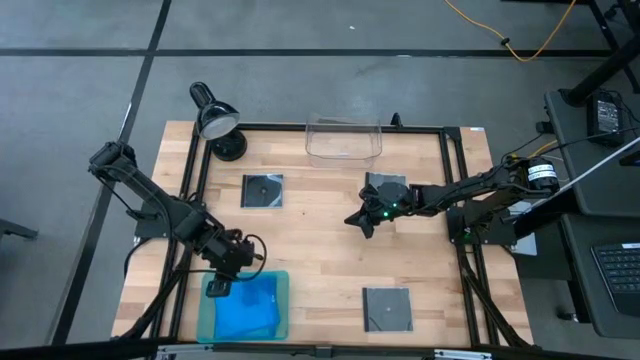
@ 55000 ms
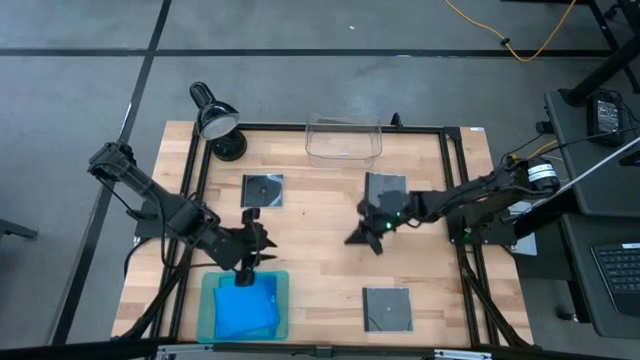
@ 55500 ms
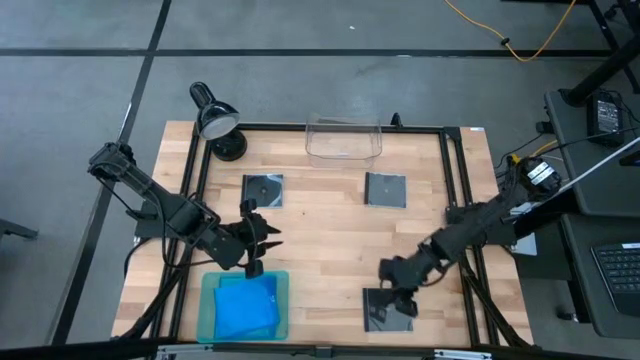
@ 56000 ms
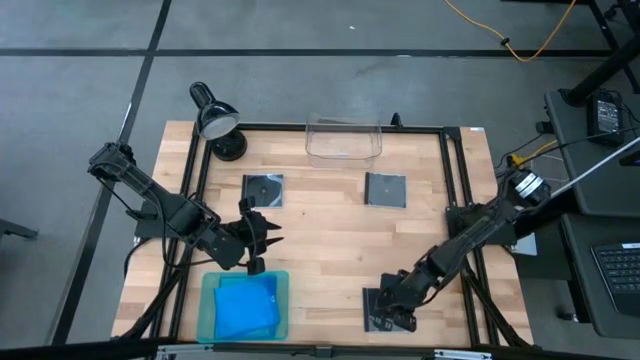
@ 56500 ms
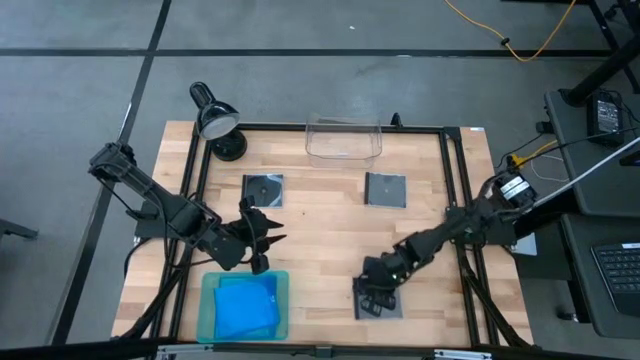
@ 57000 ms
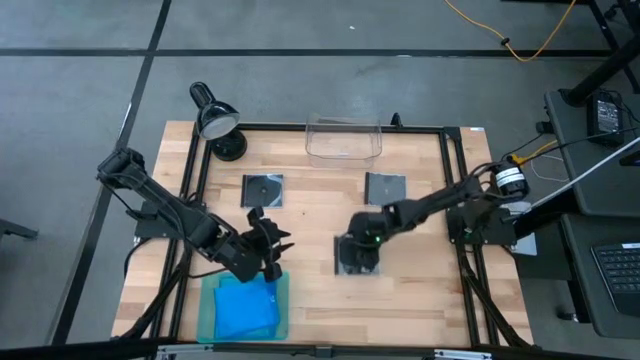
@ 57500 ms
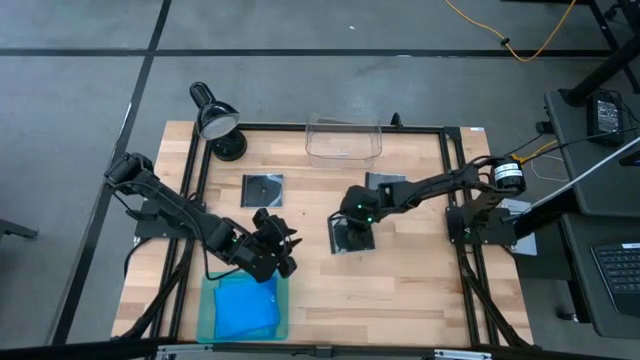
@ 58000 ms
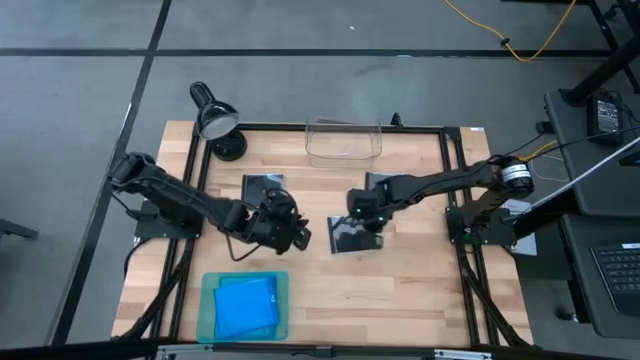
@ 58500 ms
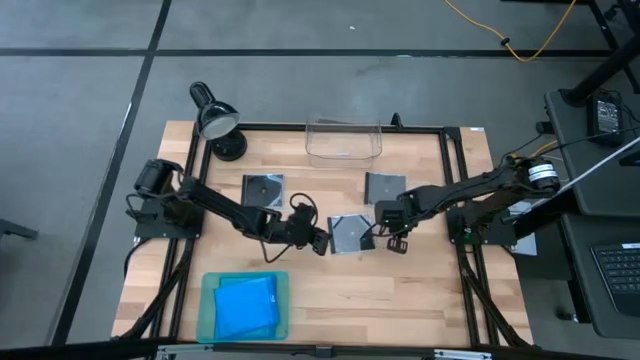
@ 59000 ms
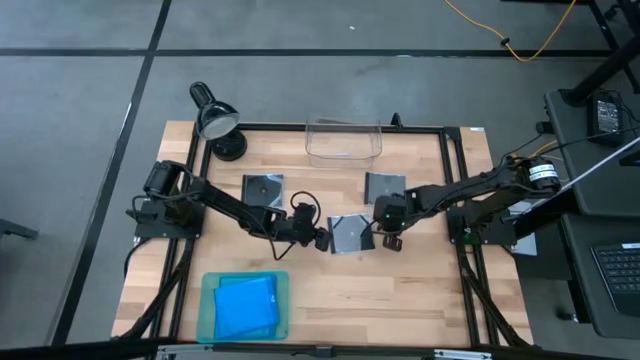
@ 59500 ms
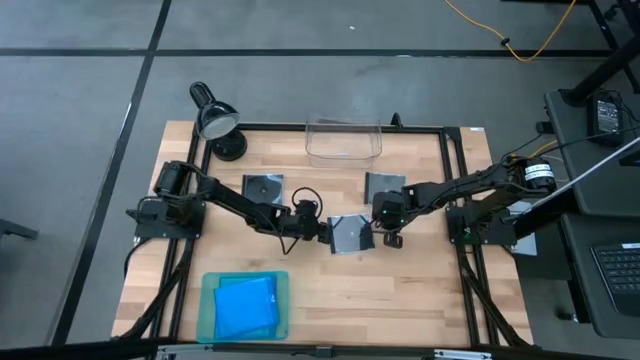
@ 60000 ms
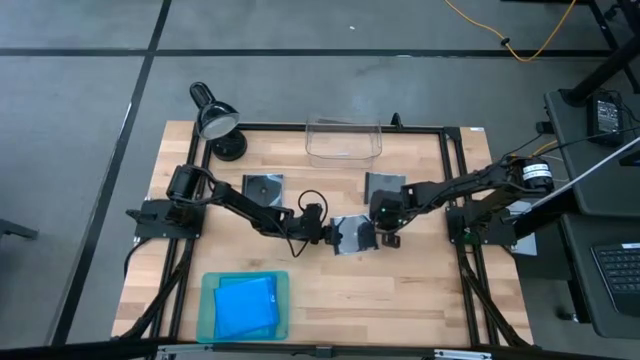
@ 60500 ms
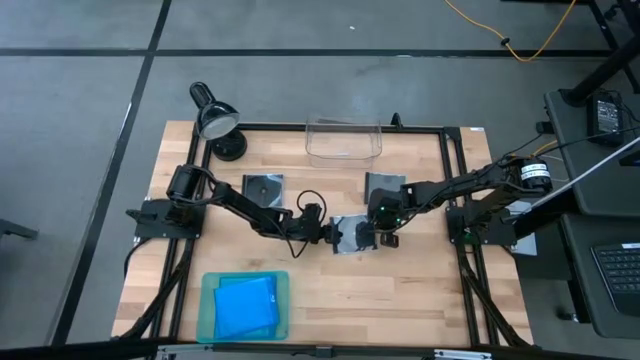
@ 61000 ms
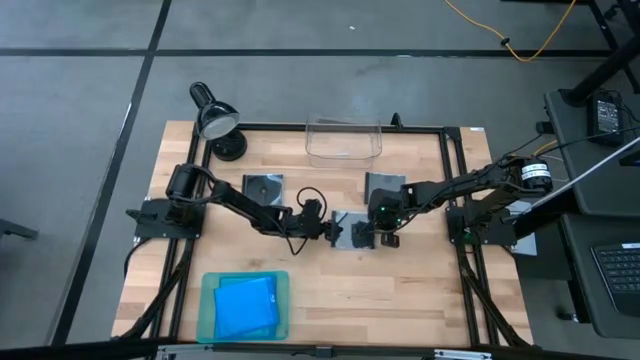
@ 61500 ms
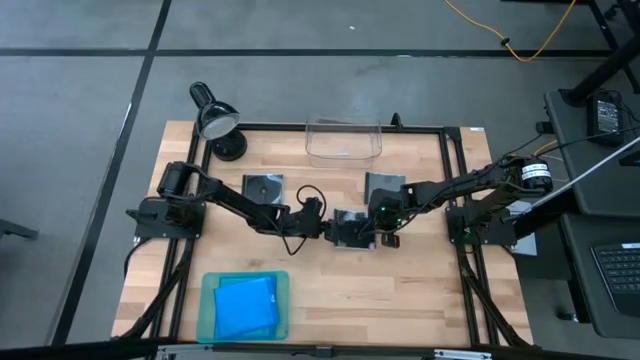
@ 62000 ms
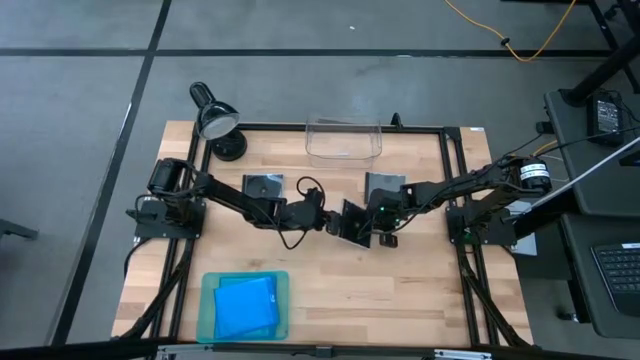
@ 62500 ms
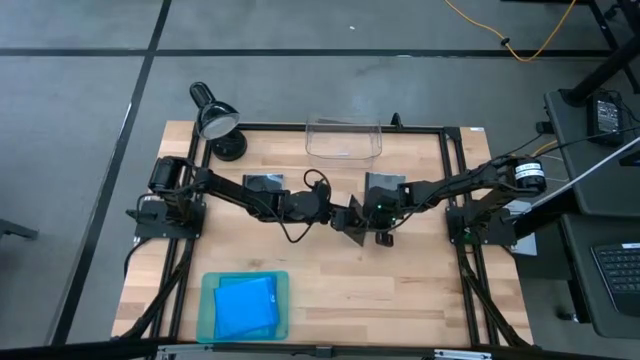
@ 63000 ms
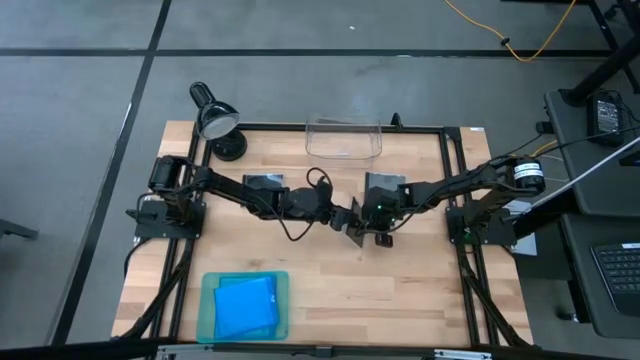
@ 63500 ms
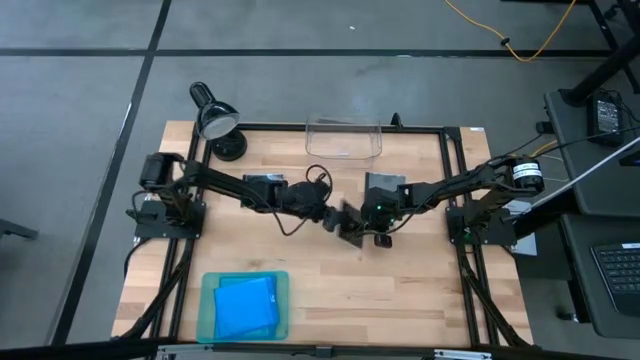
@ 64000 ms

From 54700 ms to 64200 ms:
Task: Pick & place jewel cases by type
Put the bottom black CD case into the transparent bin

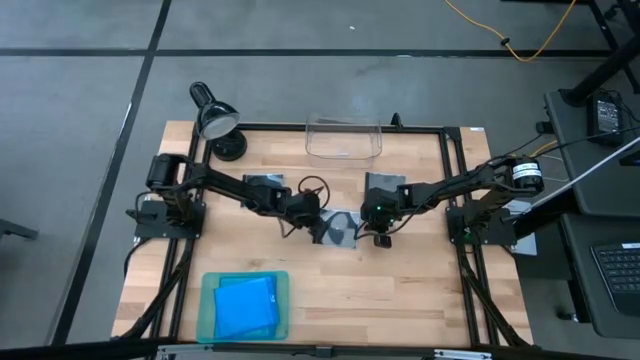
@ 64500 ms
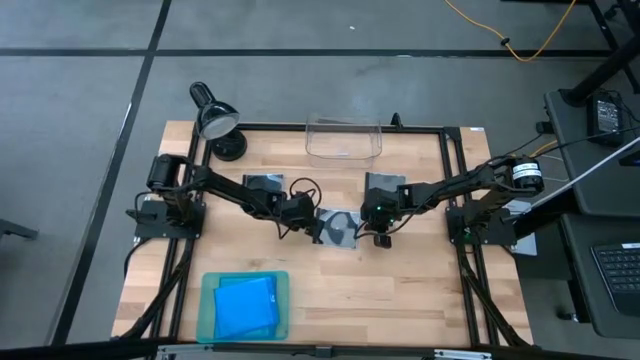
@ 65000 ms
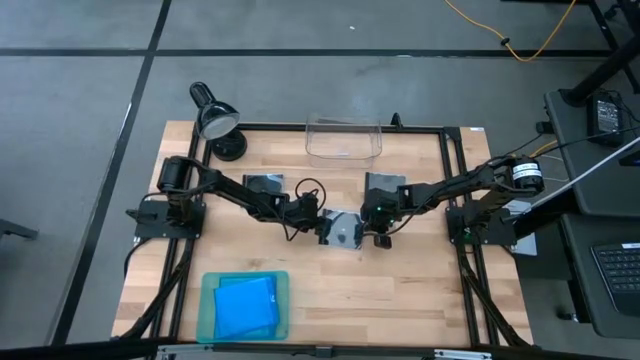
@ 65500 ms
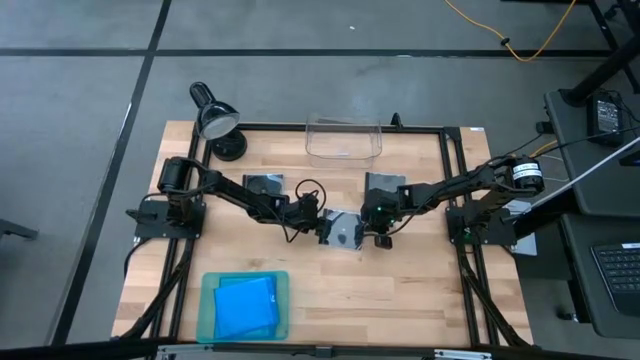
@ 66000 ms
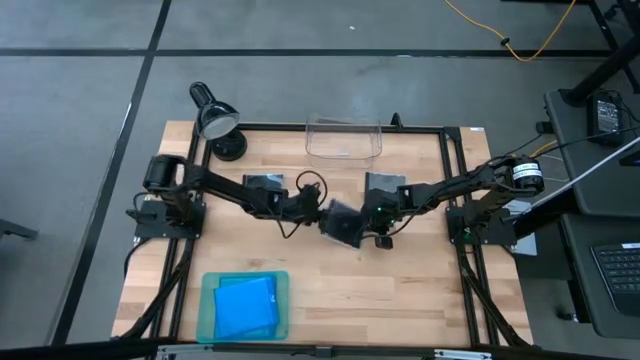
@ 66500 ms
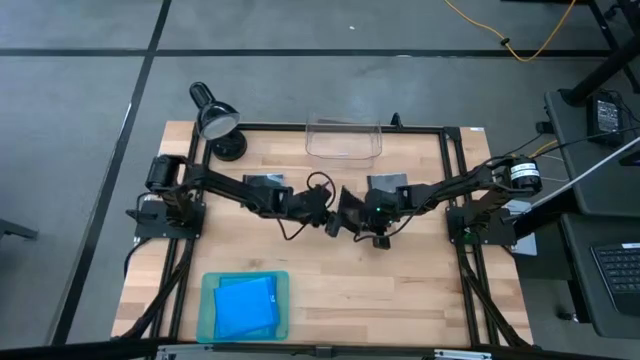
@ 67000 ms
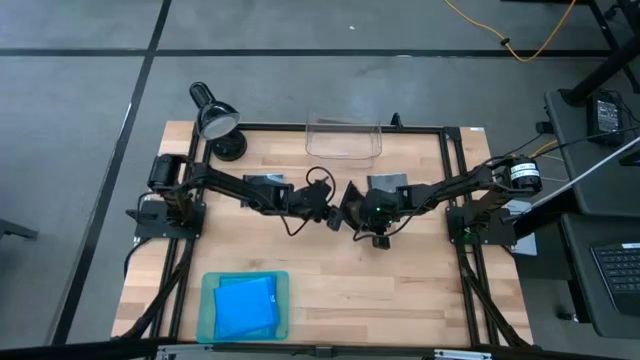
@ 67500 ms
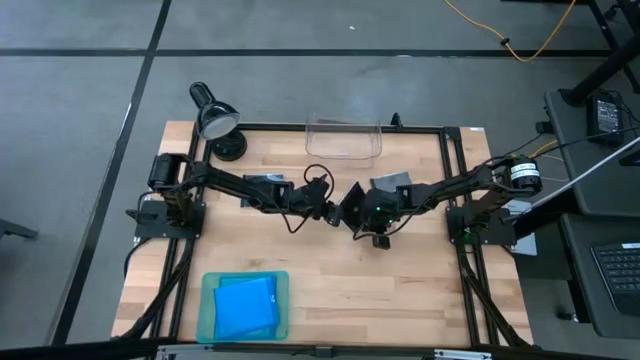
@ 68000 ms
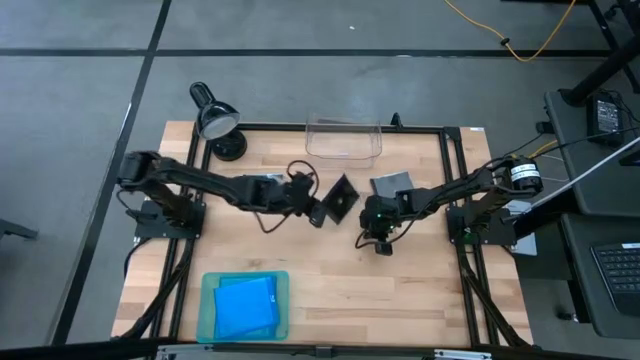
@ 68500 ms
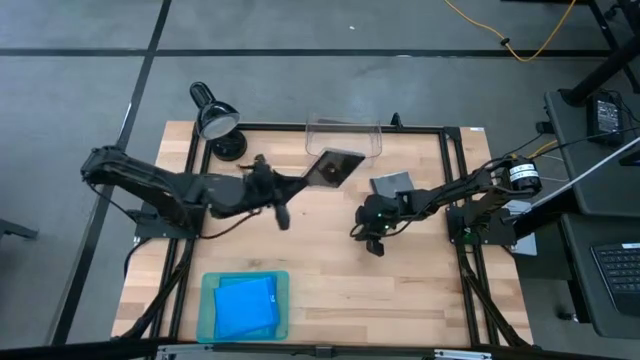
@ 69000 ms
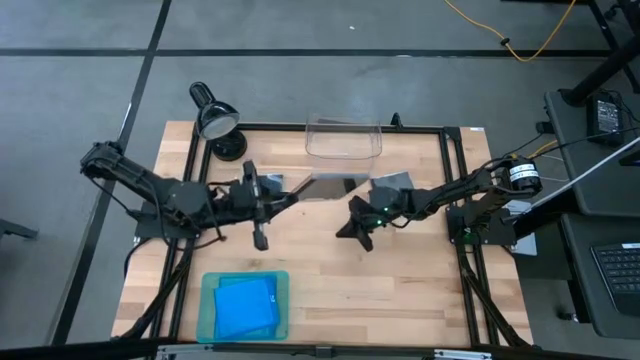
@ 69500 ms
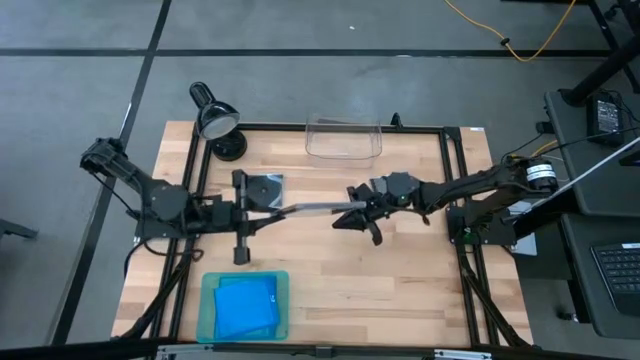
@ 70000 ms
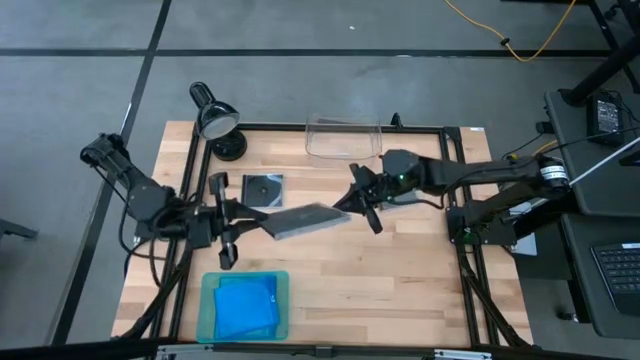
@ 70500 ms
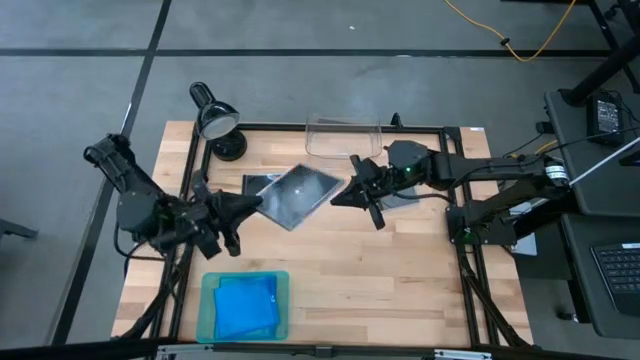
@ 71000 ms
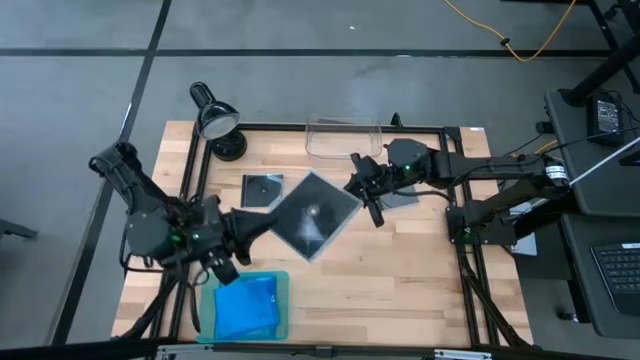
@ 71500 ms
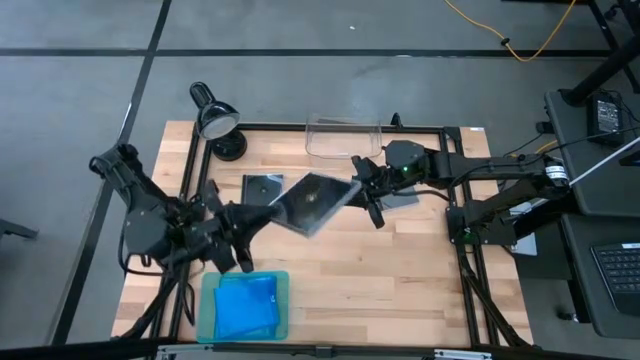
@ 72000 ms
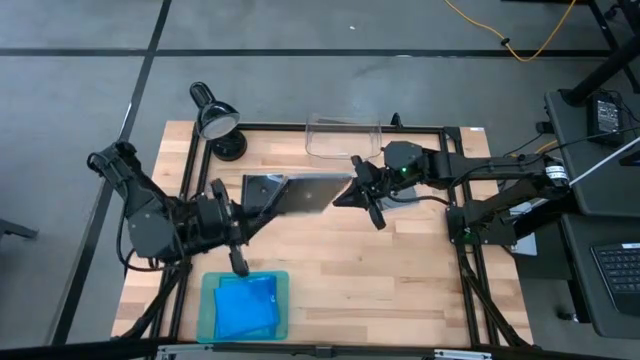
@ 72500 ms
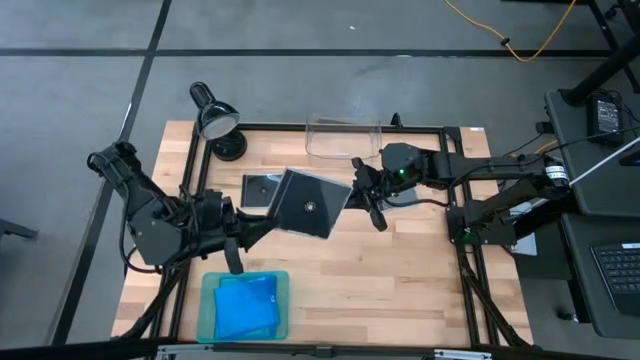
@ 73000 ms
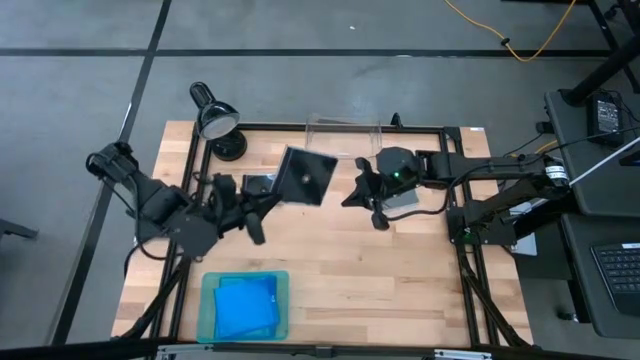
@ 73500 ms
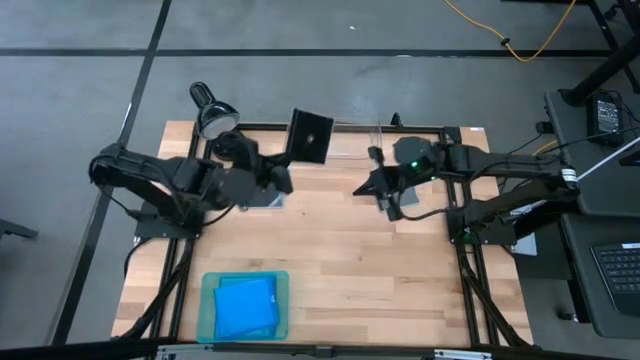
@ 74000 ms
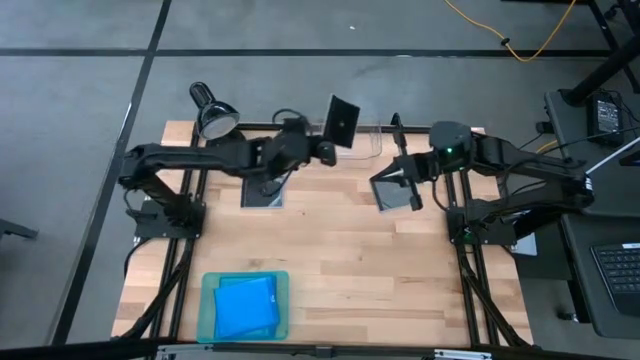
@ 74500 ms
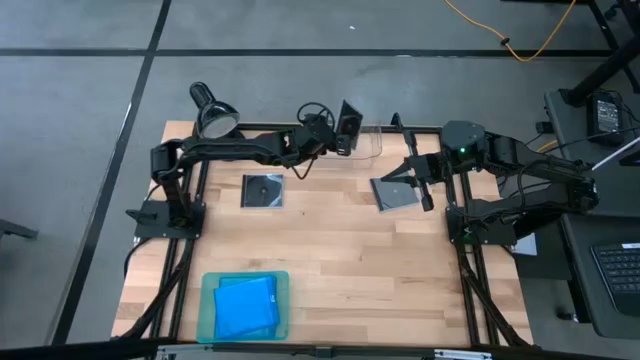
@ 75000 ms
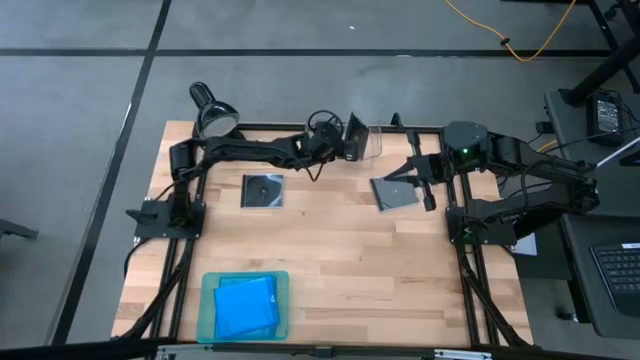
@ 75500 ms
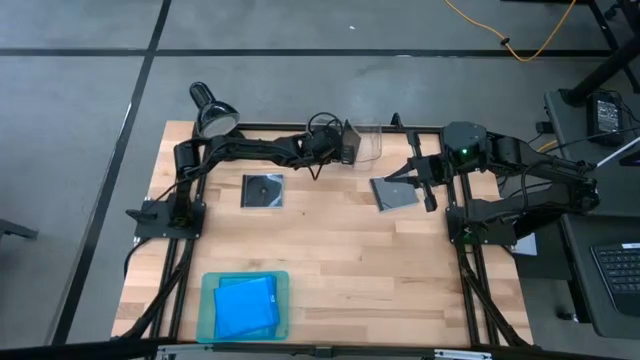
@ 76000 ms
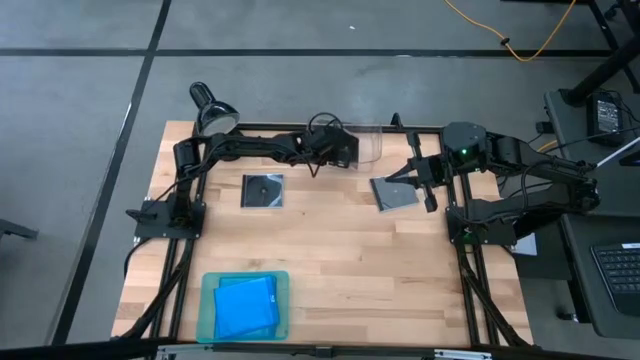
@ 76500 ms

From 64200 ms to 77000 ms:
Put the bottom black CD case into the transparent bin
